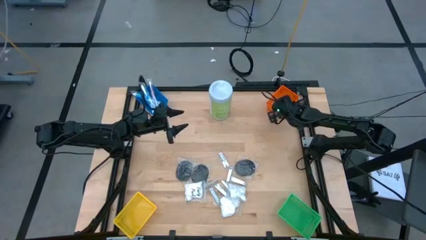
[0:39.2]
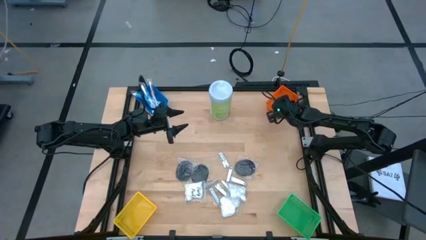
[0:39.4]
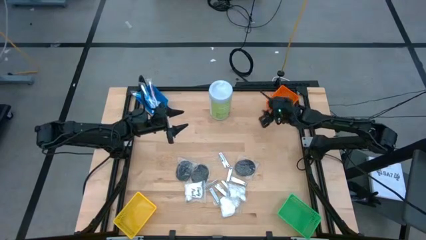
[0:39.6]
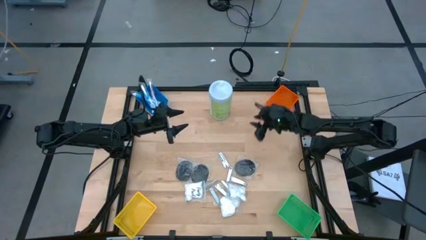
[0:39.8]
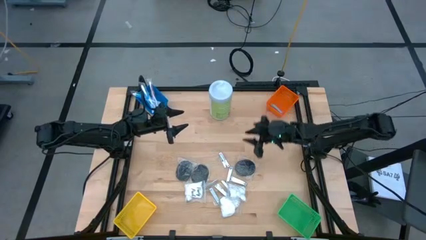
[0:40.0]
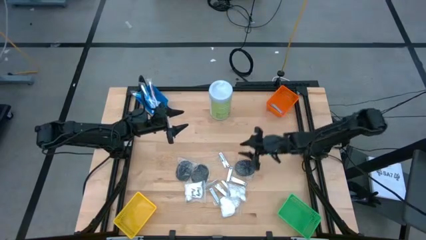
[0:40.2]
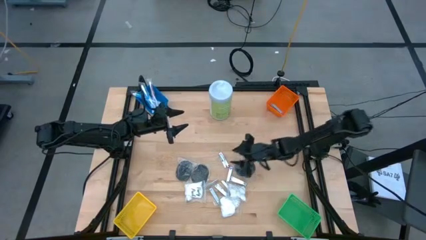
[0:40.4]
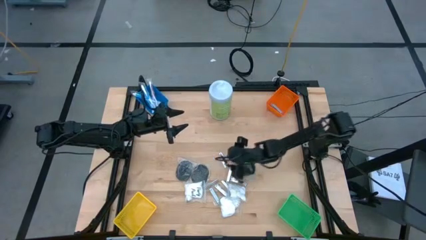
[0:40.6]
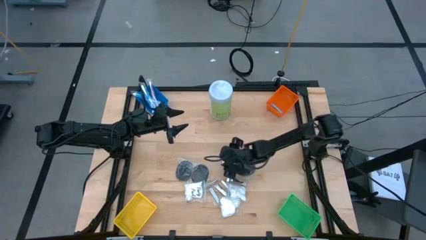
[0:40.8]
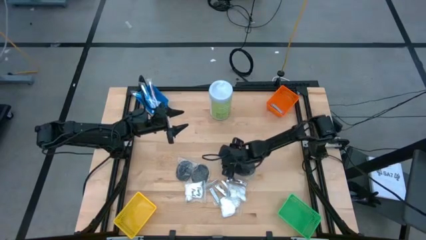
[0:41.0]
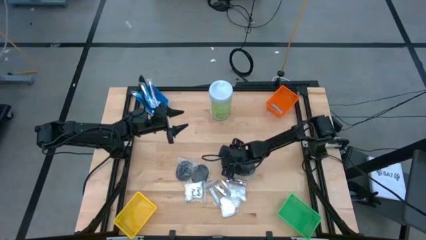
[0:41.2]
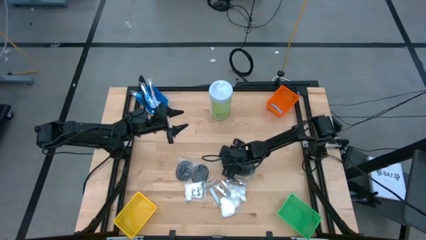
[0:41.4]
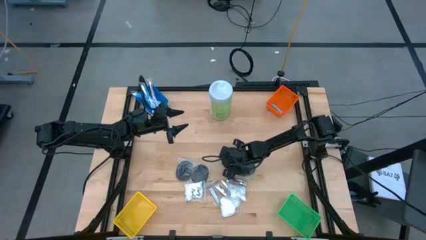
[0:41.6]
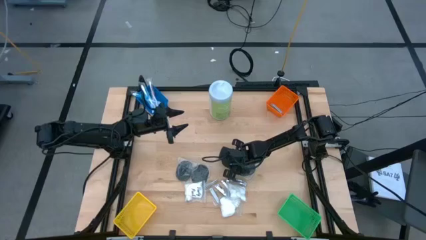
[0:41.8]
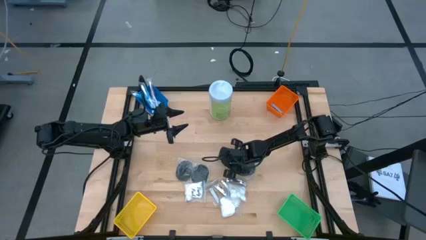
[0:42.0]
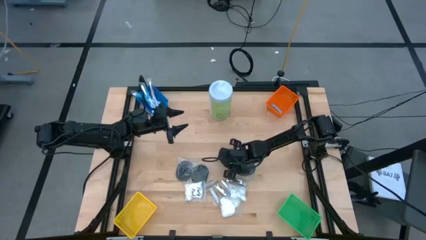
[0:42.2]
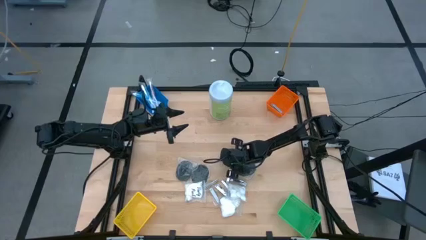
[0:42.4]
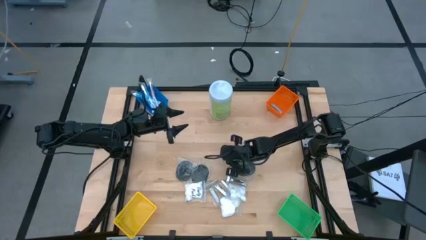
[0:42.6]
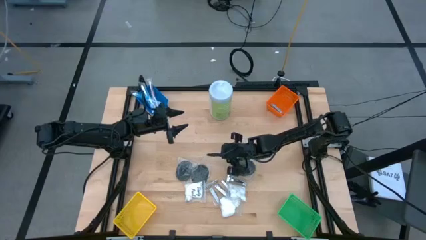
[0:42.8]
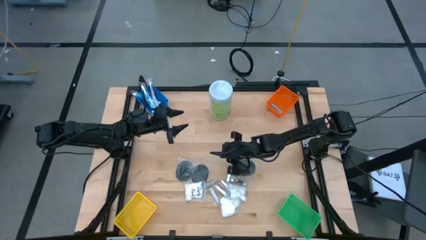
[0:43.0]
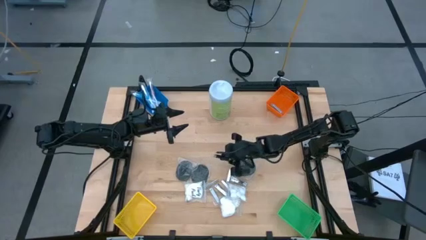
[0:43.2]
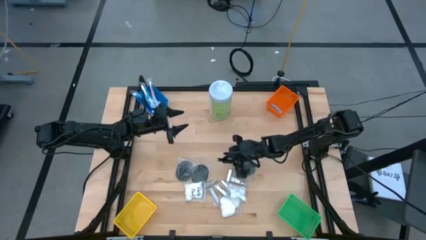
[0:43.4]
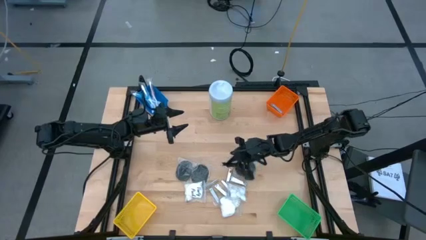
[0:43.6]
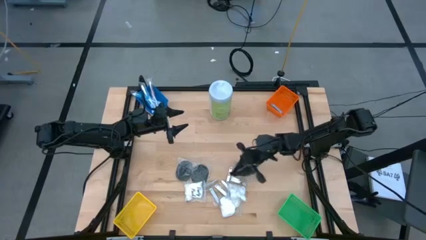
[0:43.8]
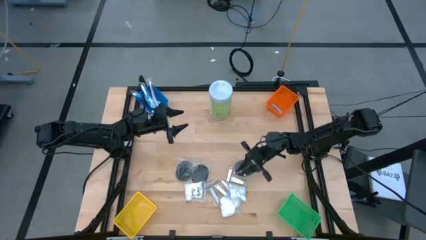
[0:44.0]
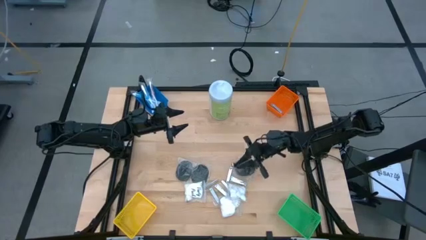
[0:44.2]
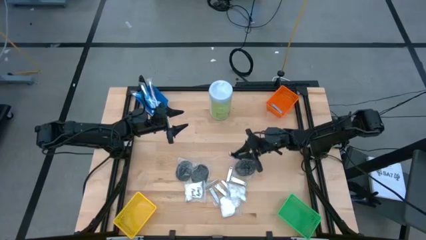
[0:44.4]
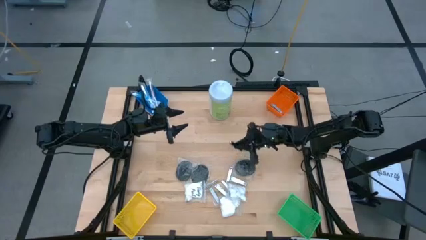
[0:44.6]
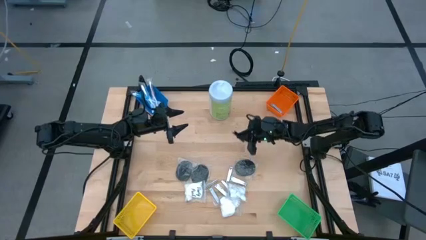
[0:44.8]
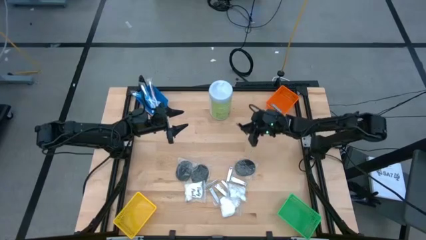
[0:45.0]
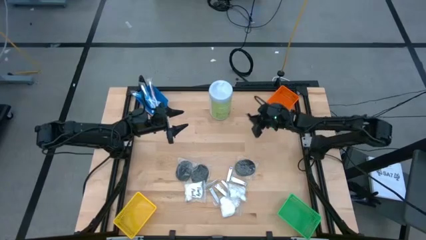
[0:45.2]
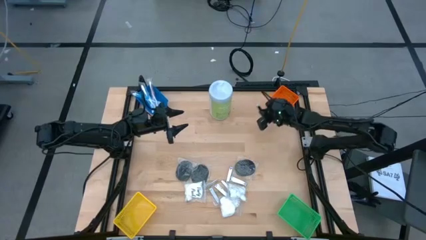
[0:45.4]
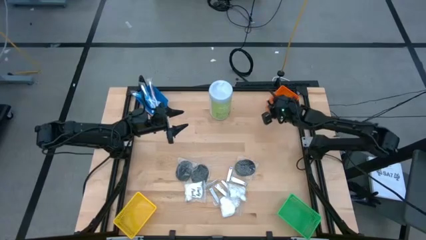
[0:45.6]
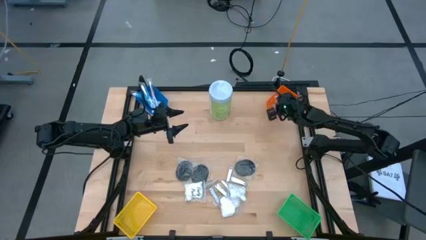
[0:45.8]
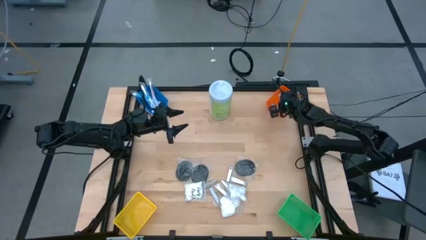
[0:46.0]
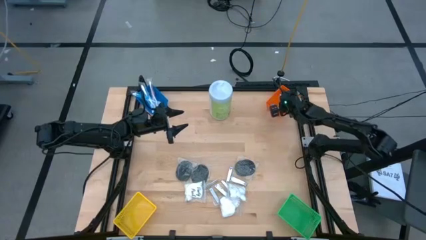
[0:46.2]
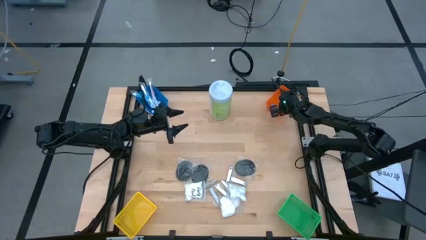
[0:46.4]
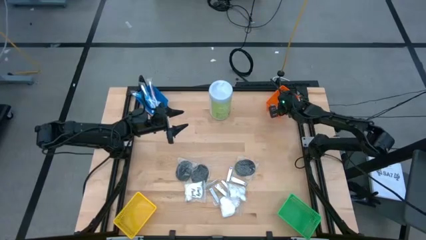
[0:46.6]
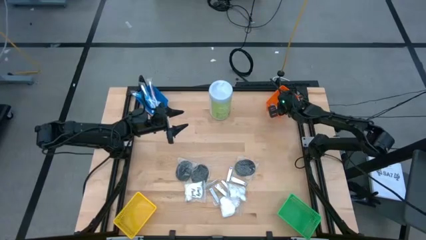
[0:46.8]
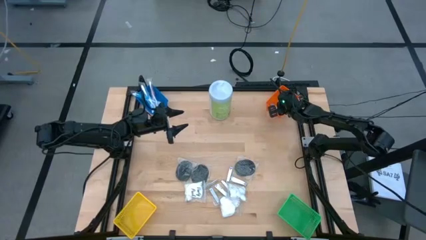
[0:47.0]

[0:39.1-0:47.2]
Task: Pick & Place Travel size toiletries
Put the nail cutter into the orange bin

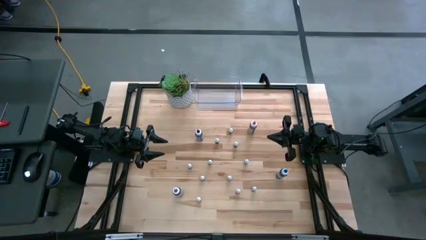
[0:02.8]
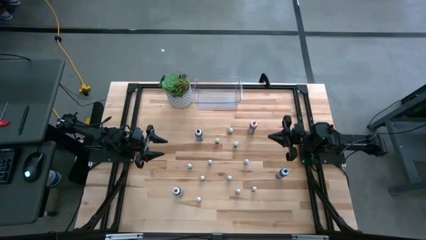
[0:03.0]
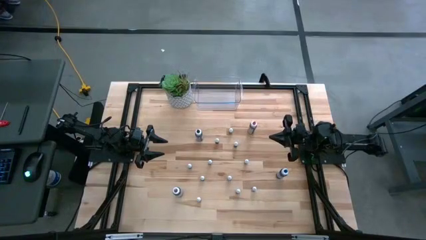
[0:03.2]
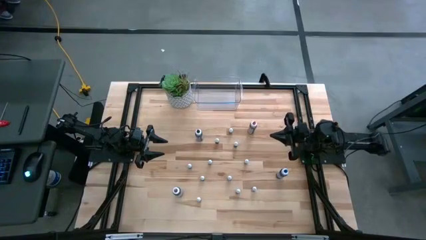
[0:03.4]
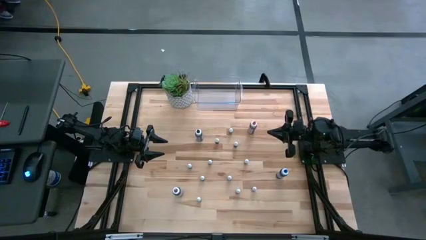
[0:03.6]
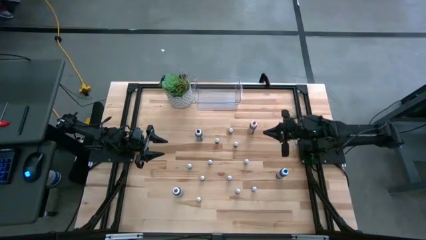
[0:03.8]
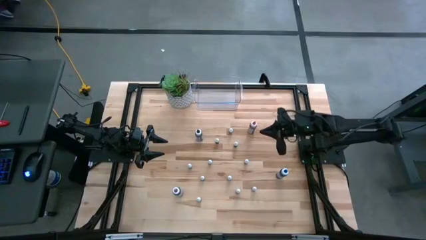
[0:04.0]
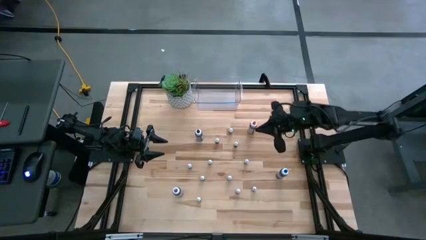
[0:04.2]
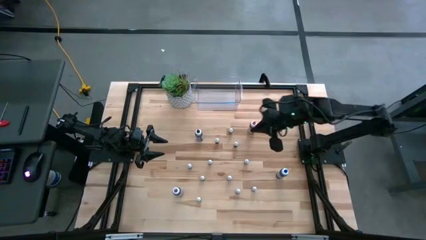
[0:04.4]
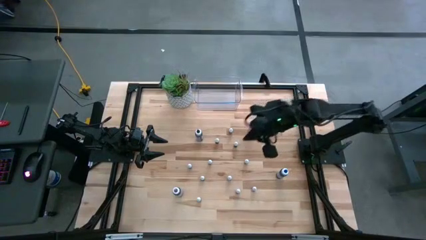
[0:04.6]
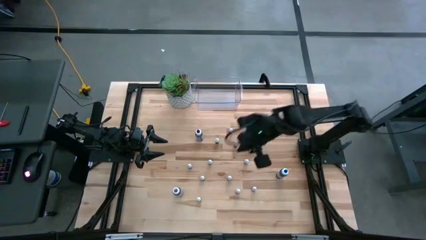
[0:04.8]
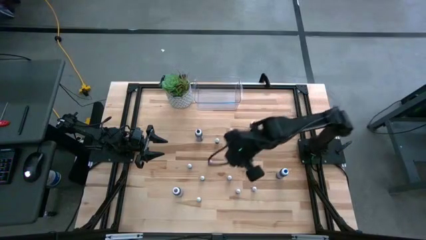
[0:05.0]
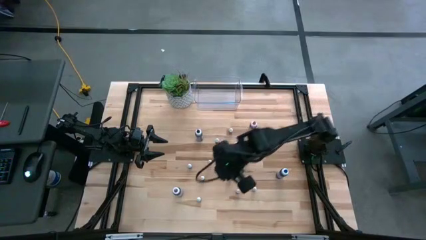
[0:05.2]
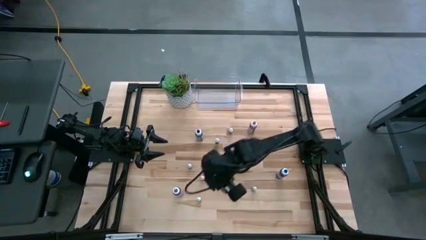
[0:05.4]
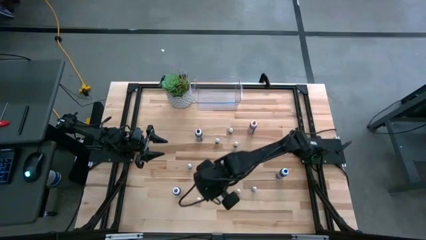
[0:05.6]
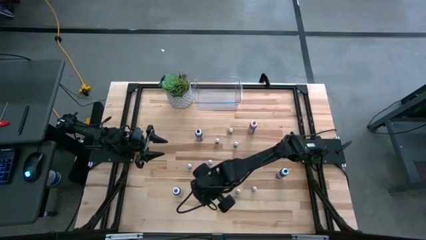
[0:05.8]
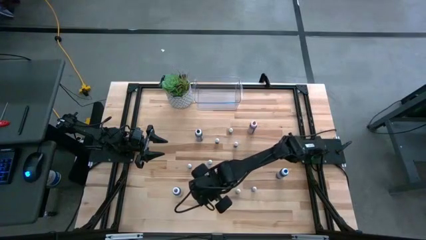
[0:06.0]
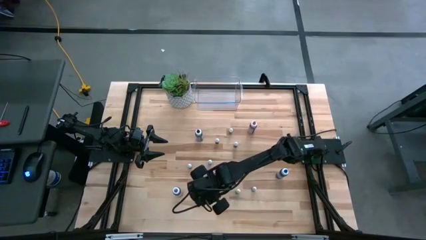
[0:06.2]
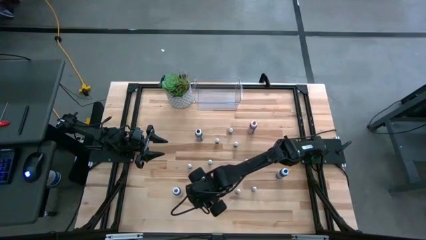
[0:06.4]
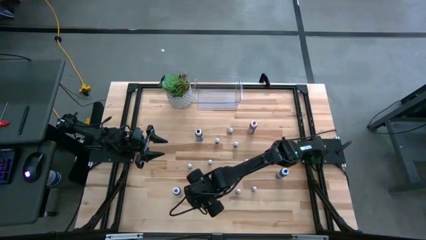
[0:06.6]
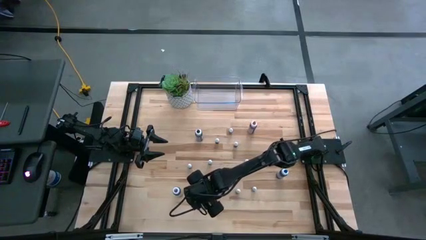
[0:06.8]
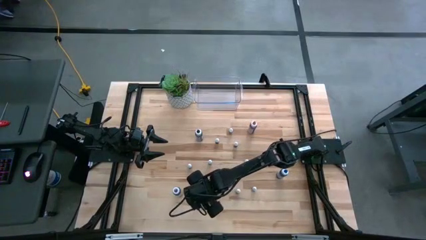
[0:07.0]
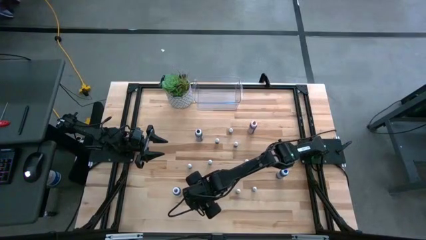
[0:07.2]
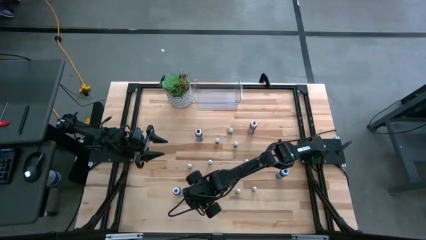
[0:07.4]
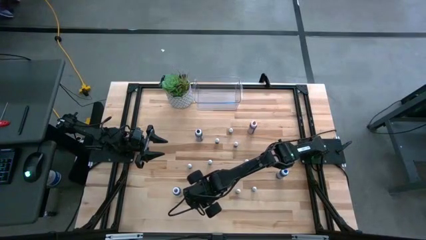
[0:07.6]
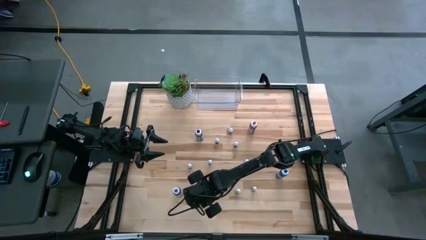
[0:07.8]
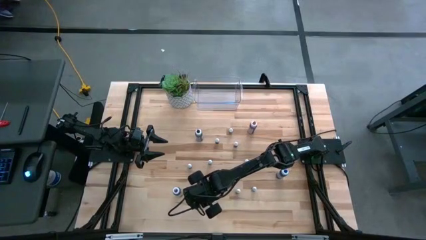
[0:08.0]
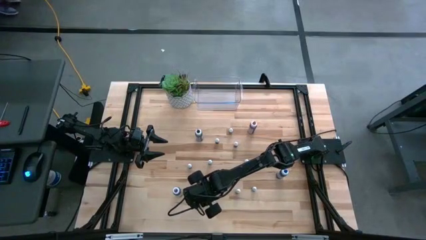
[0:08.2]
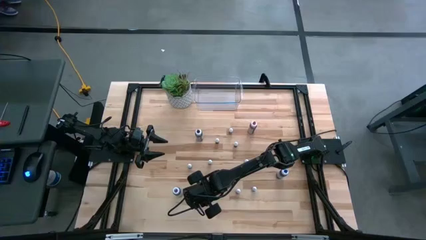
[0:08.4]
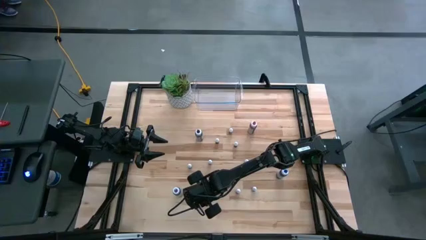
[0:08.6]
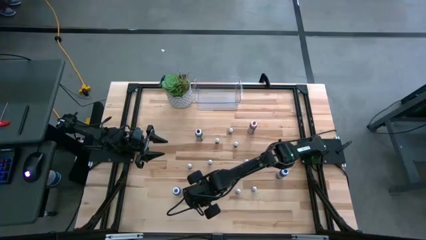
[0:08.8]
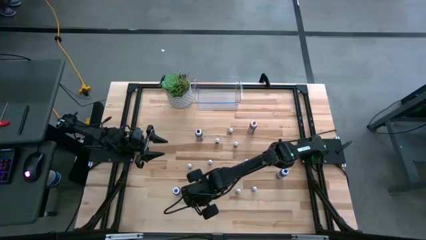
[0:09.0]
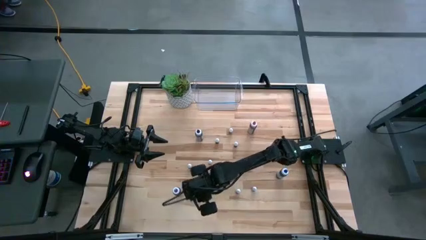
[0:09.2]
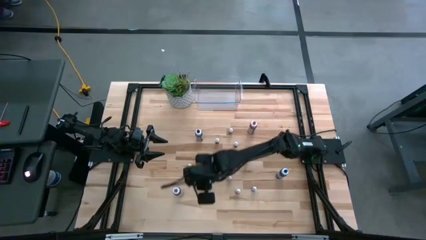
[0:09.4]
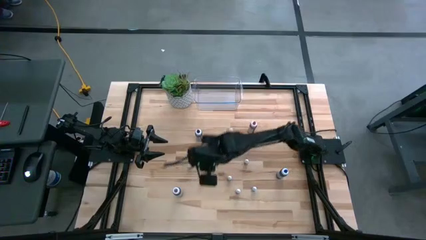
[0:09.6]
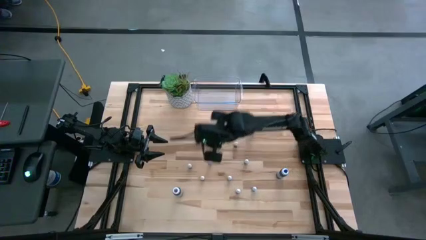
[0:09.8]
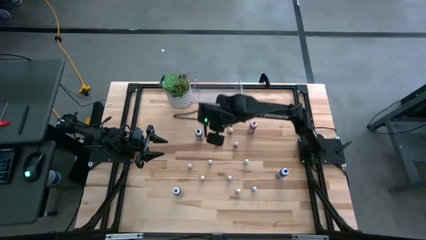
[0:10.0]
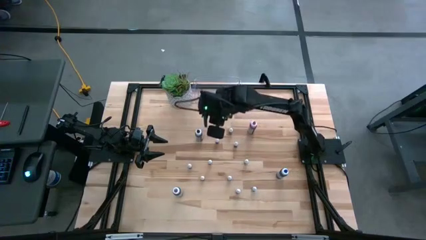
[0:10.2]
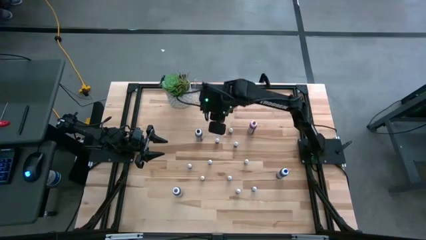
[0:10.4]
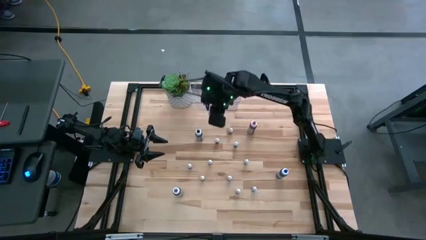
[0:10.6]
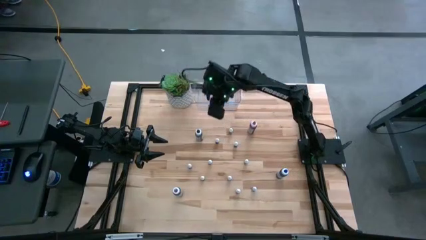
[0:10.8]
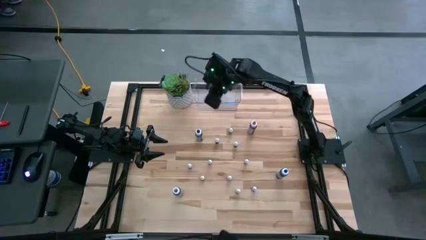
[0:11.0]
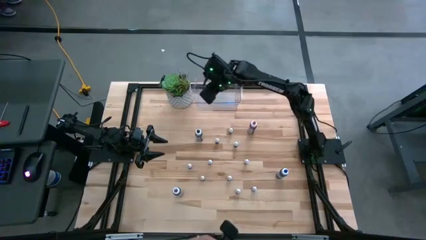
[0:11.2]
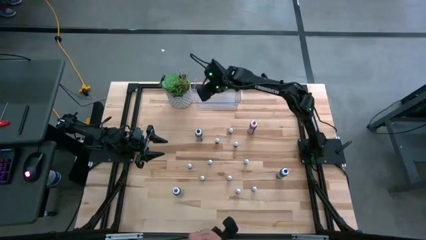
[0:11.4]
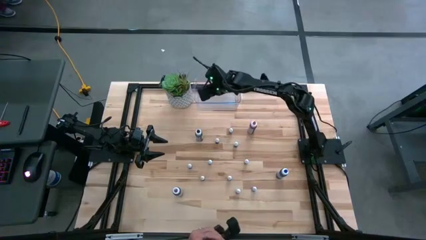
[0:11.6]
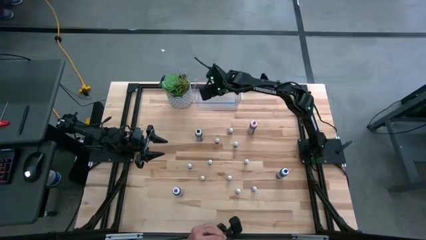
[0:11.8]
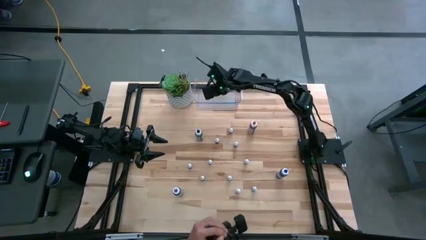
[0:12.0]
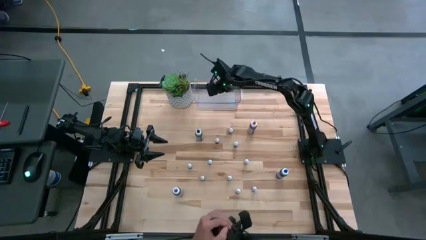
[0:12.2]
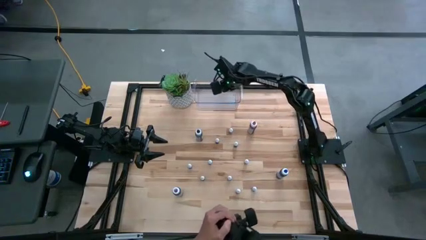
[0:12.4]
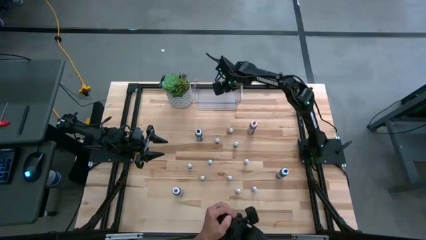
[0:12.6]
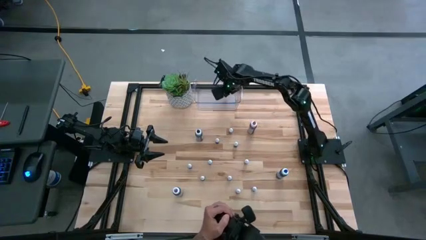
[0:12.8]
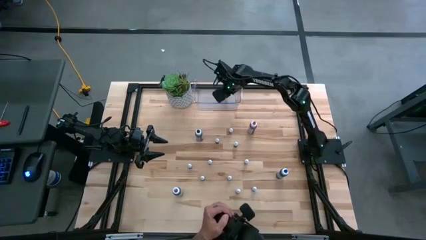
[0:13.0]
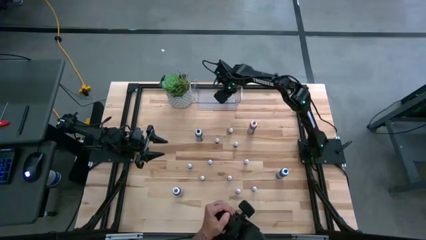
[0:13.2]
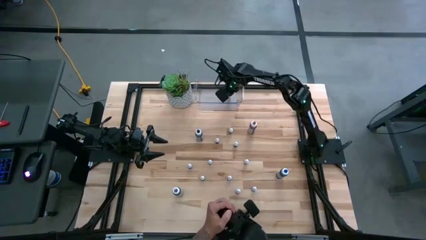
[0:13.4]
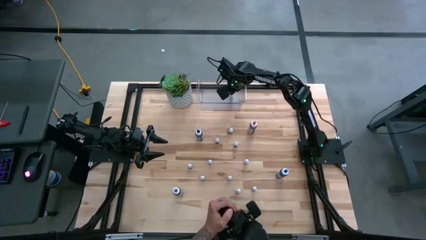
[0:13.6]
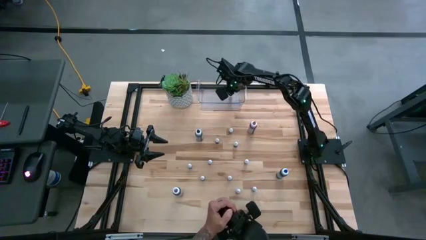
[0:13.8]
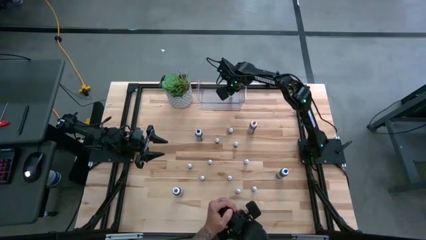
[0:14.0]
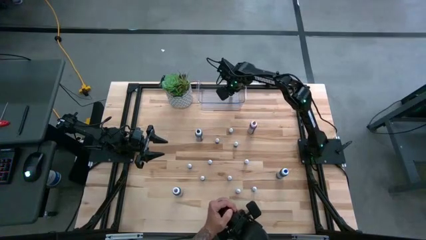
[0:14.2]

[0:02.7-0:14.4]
Task: Pick & Place food coloring
Put the small brown food coloring bottle into the bin
